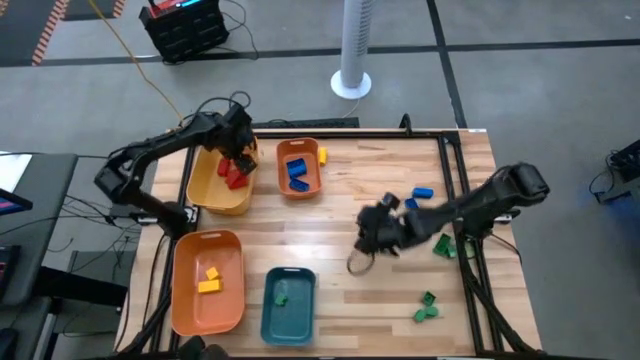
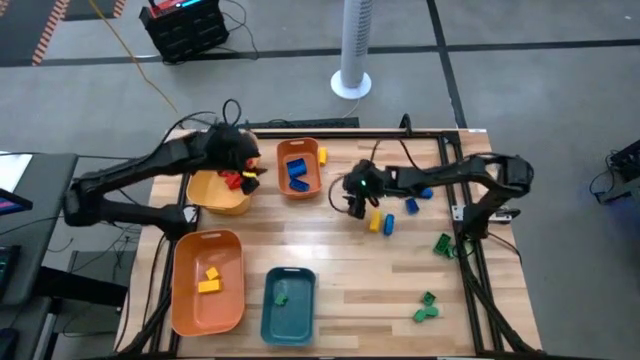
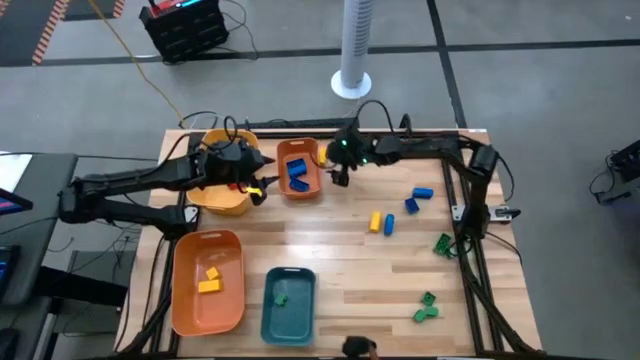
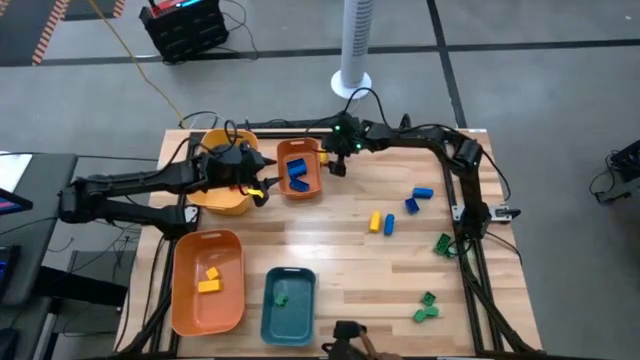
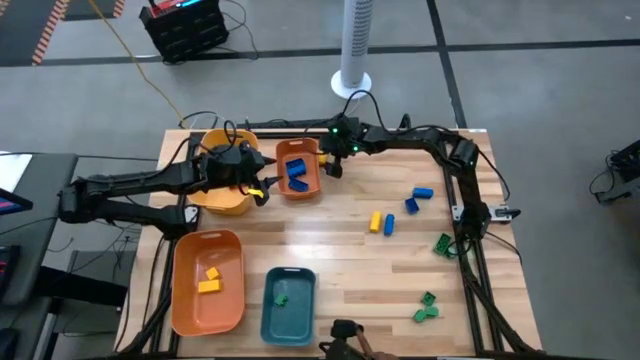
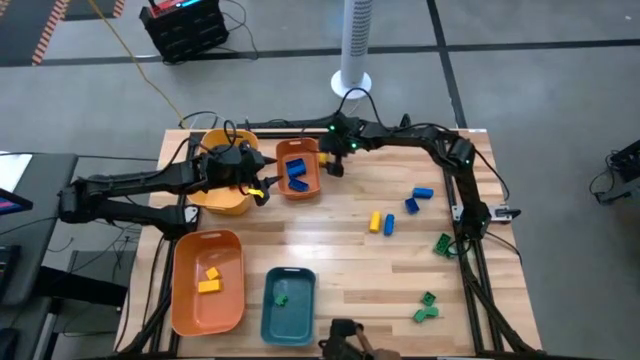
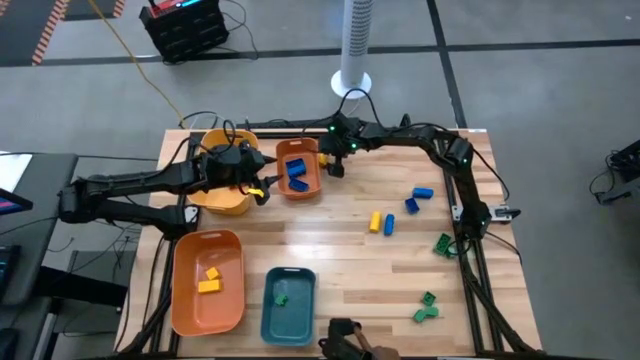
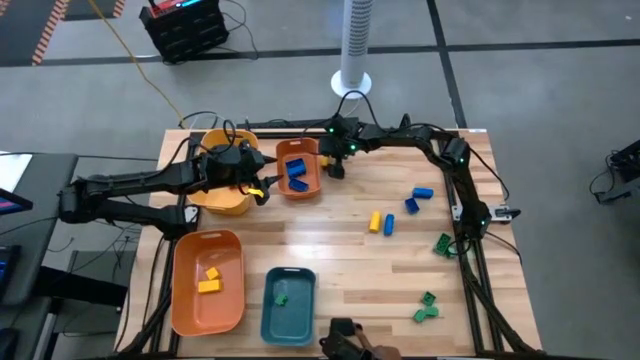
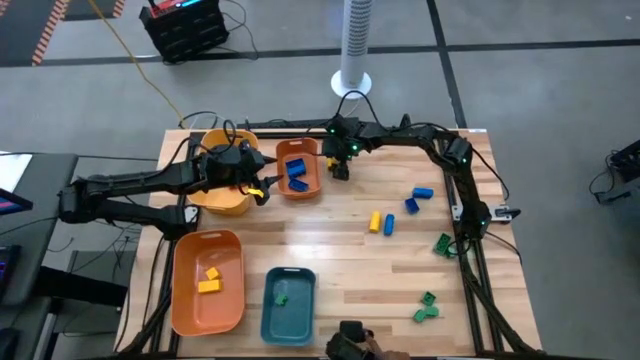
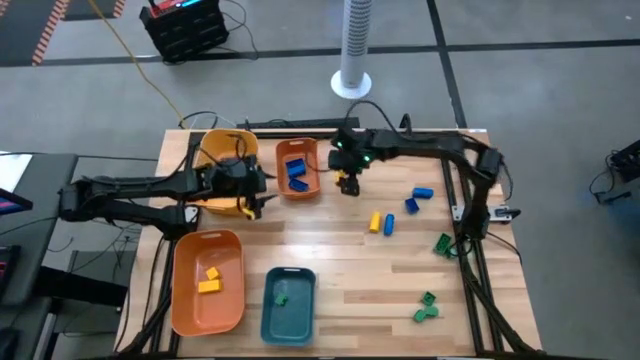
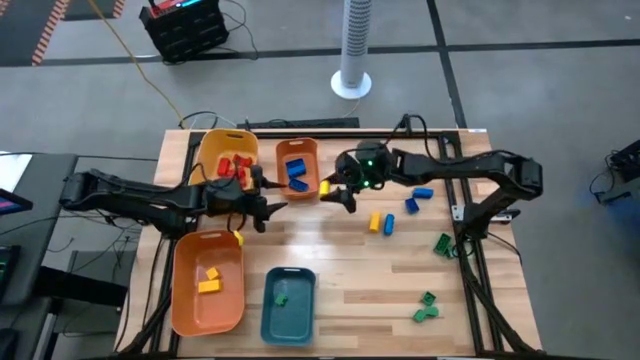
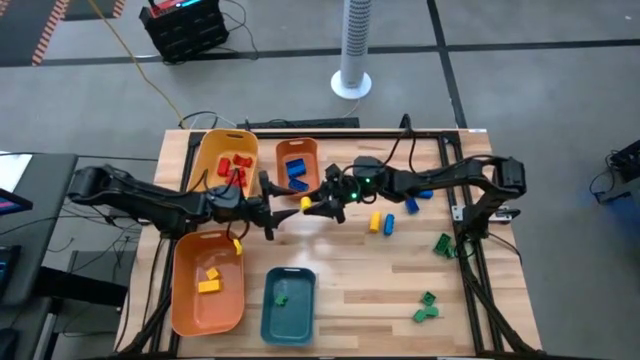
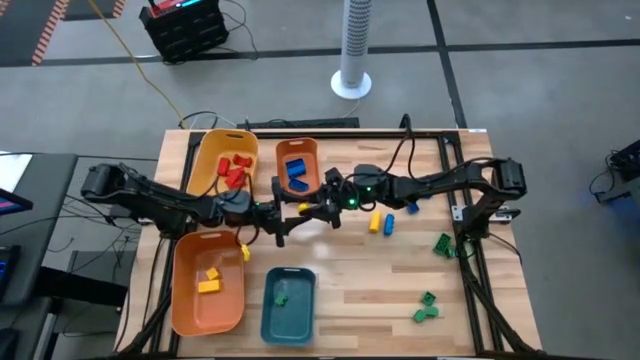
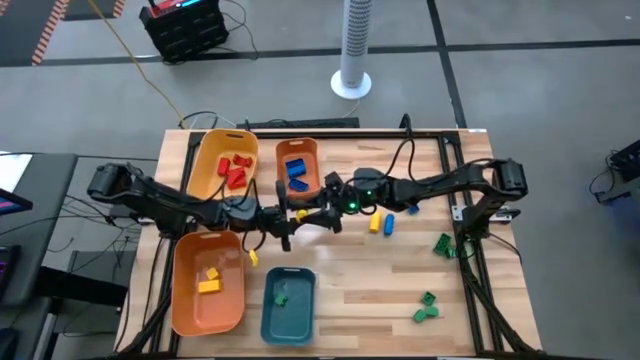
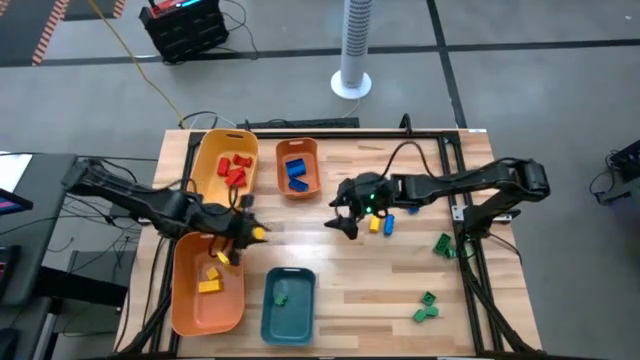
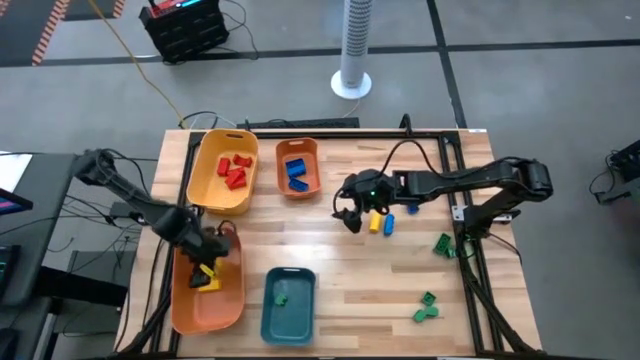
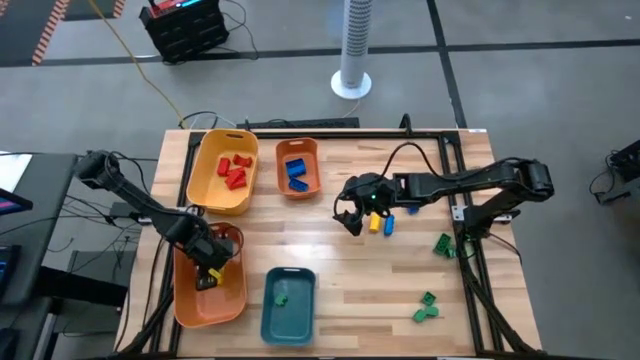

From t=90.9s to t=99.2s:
Task: Sort blocks
Put the yellow wooden block into the bottom orange bin

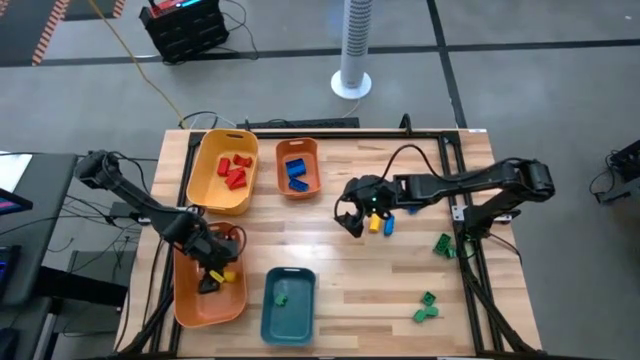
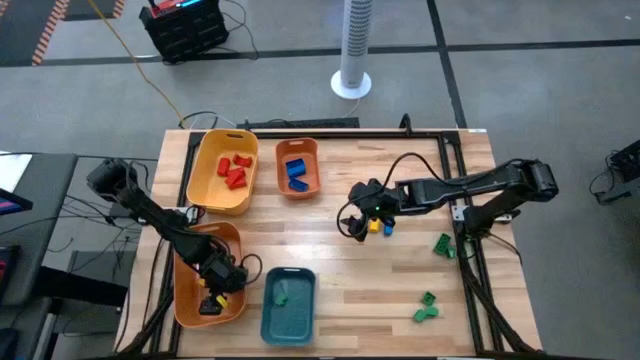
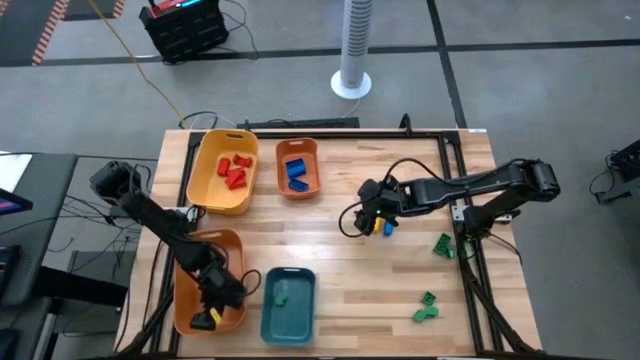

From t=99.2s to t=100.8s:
Adjust the orange bin

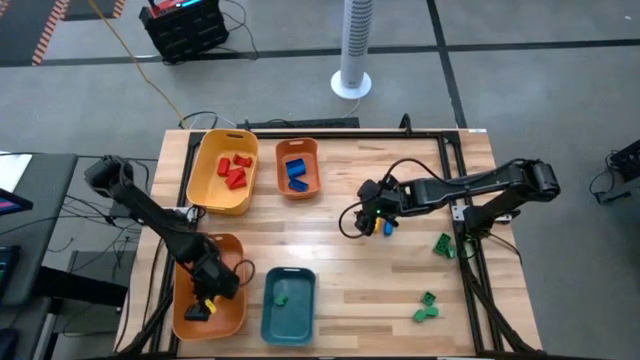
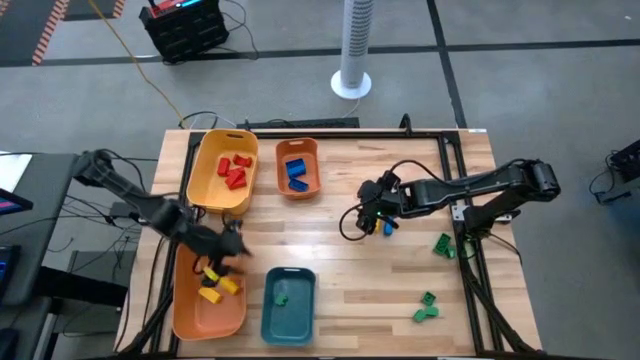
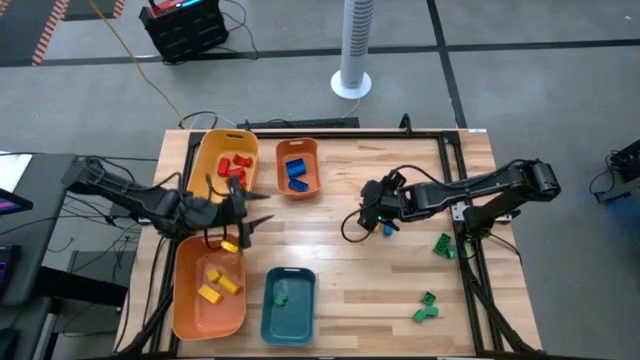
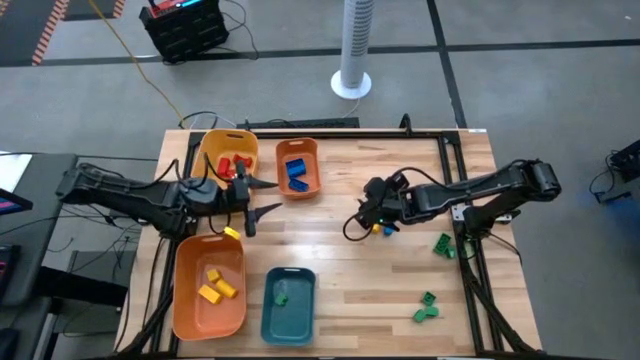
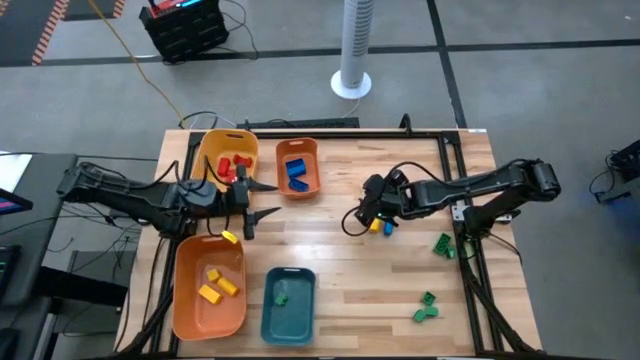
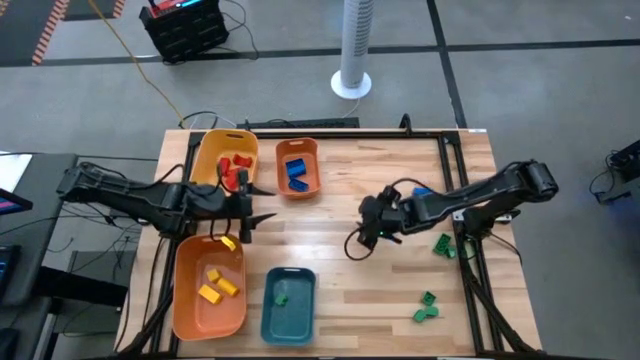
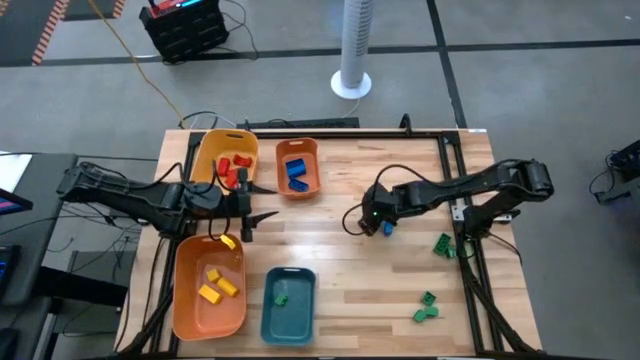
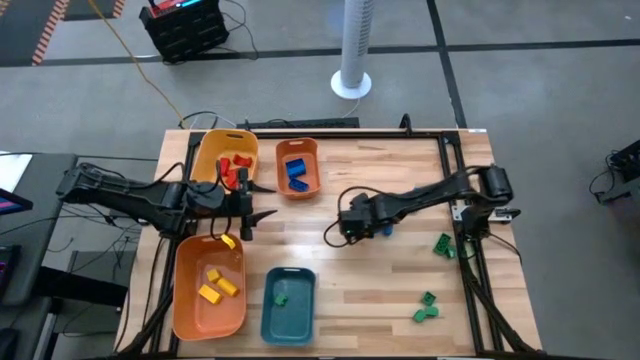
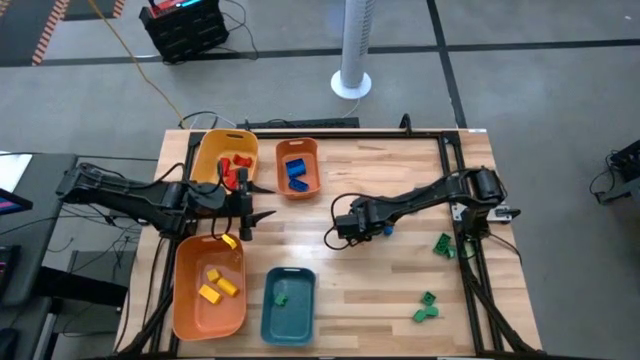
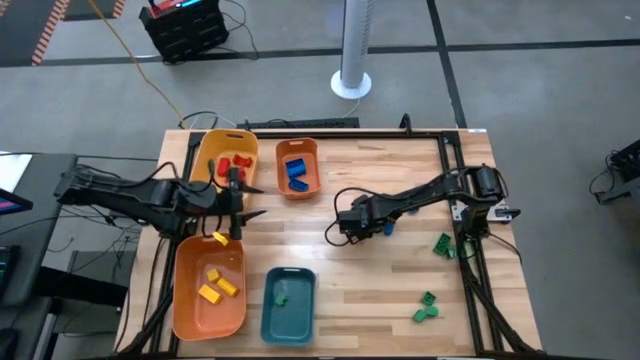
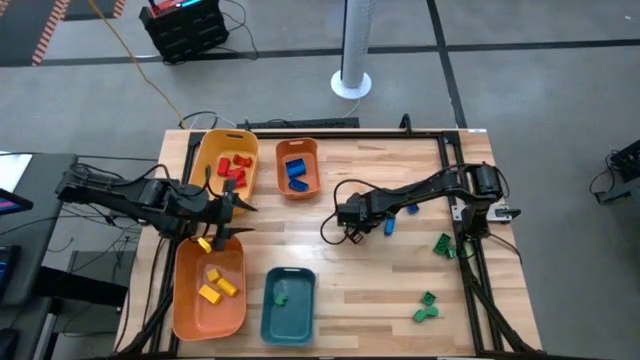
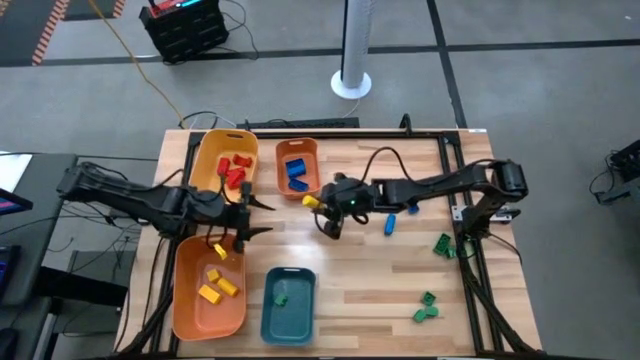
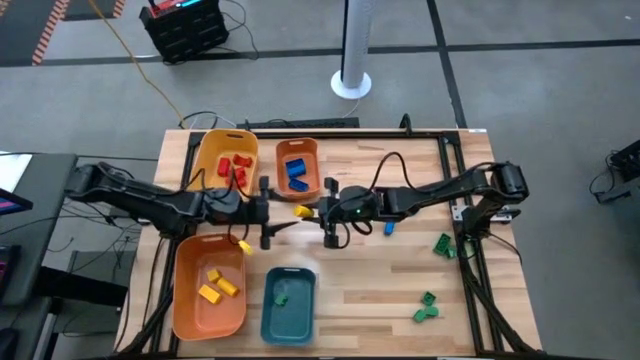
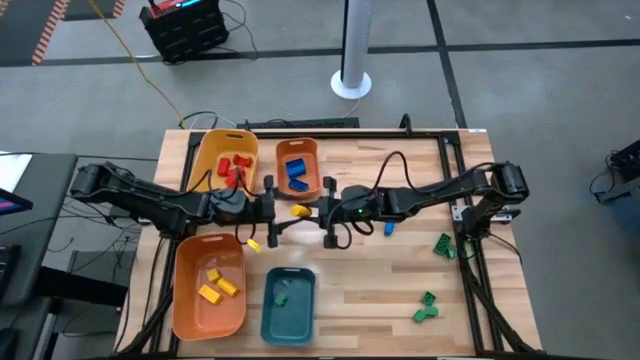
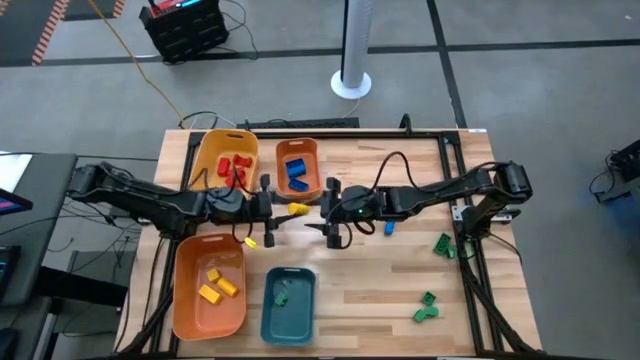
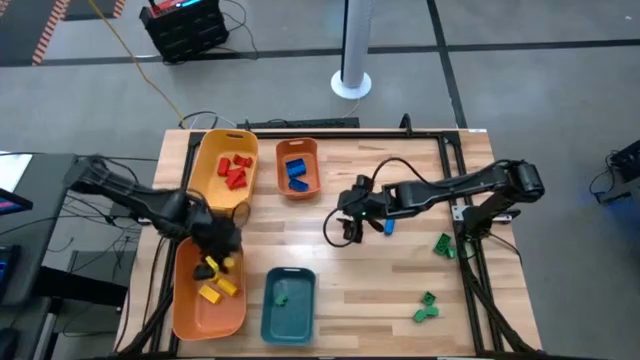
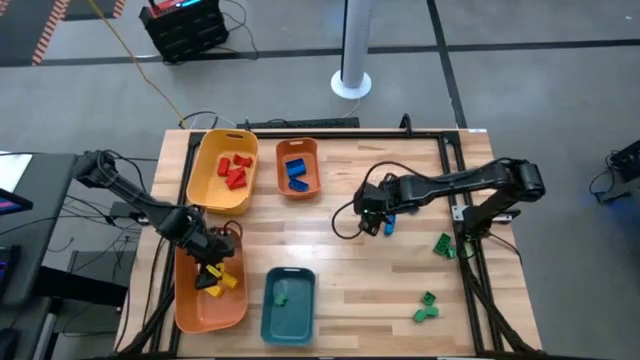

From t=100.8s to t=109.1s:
Put the yellow wooden block into the bottom orange bin

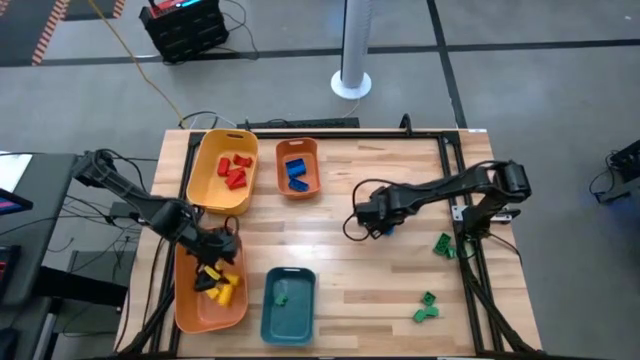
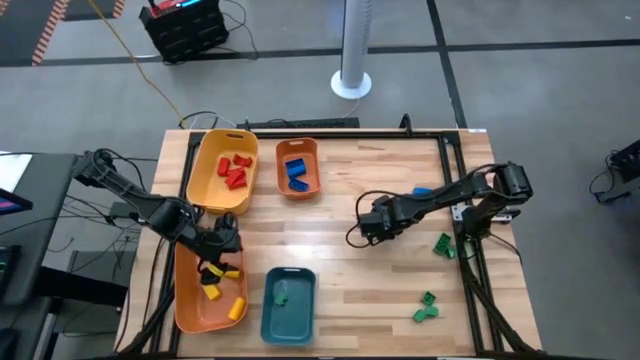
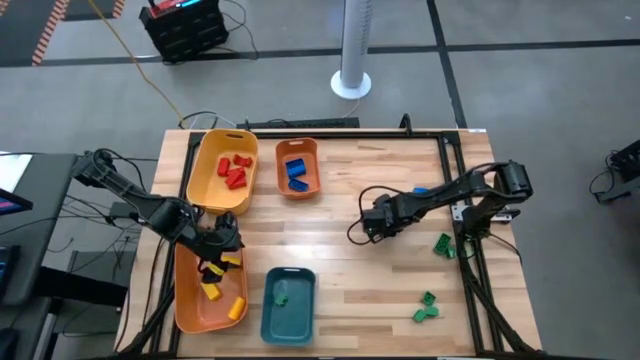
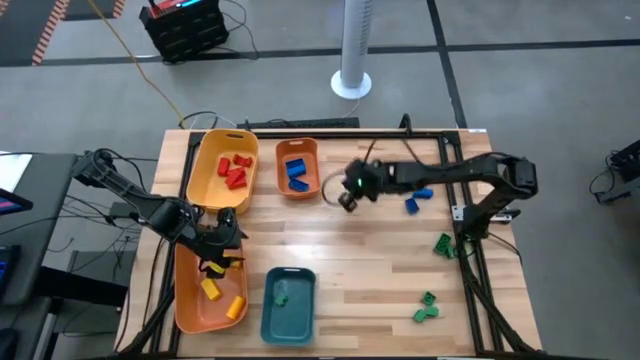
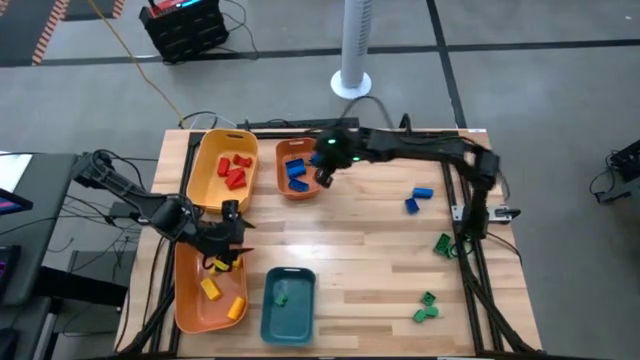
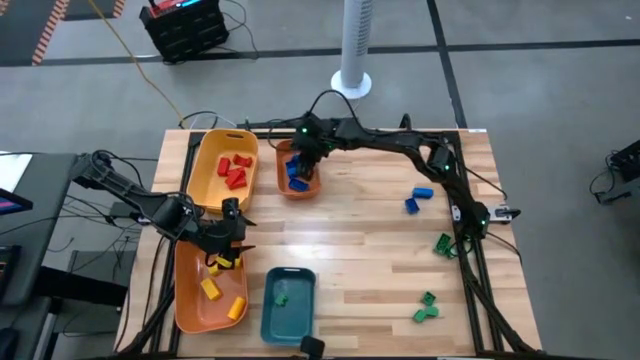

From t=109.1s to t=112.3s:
Put the blue game piece into the top orange bin

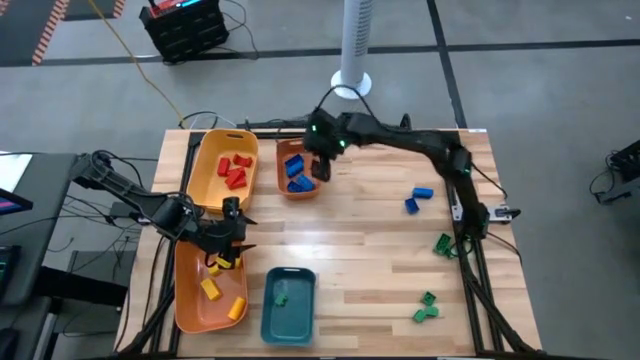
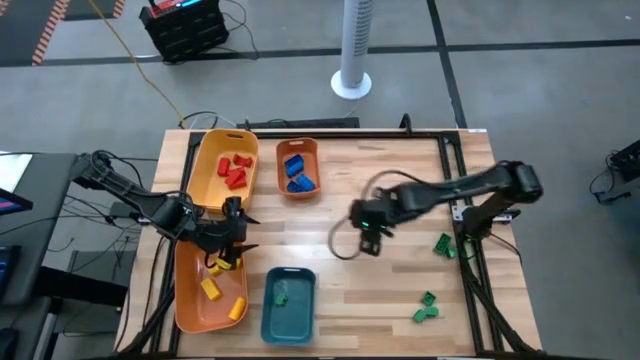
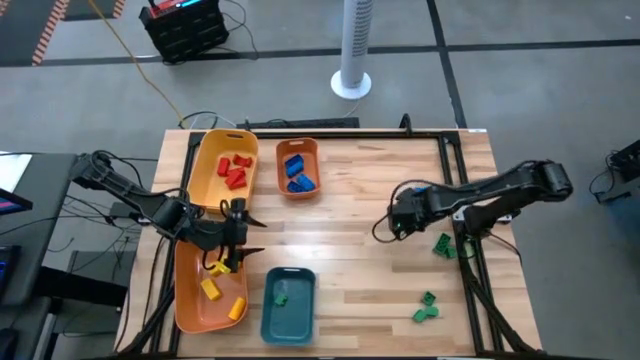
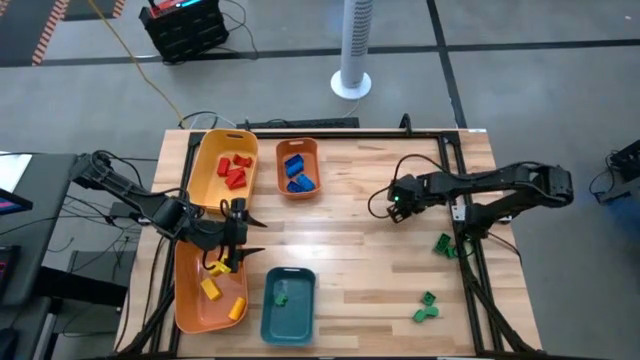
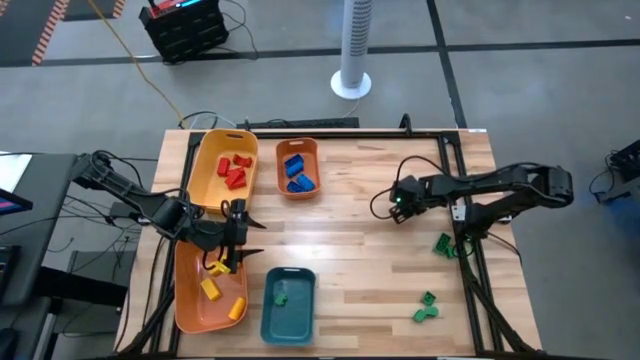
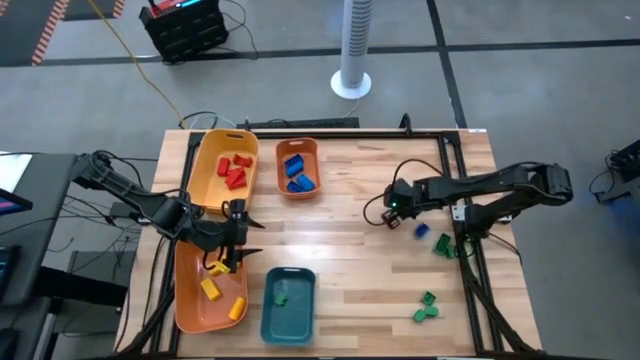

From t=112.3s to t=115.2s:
Put the blue game piece into the top orange bin
